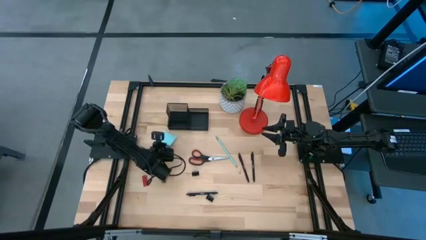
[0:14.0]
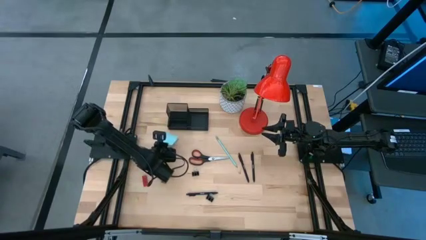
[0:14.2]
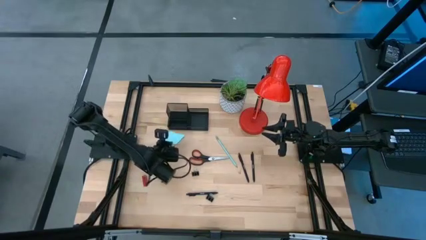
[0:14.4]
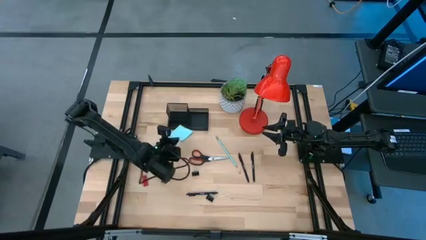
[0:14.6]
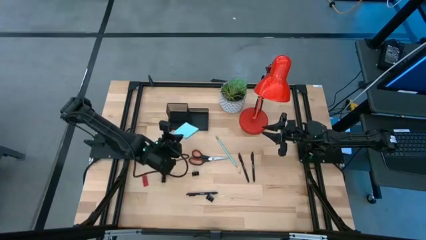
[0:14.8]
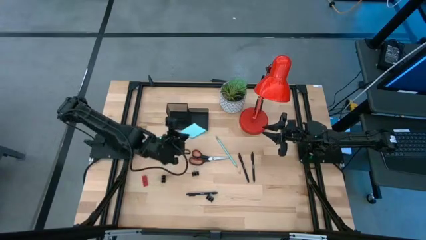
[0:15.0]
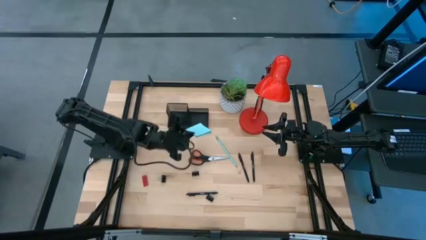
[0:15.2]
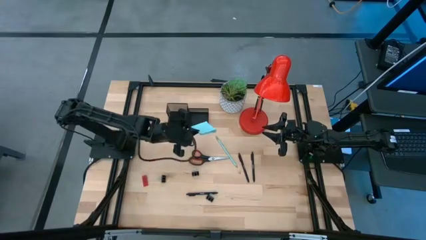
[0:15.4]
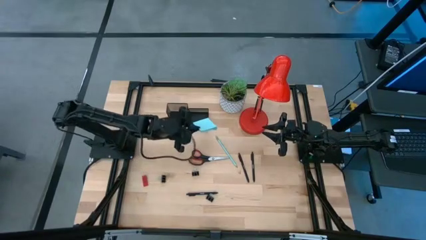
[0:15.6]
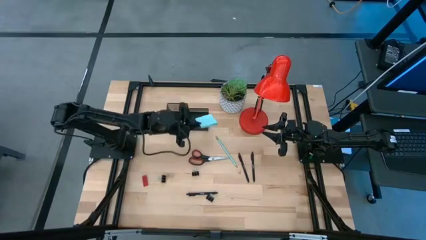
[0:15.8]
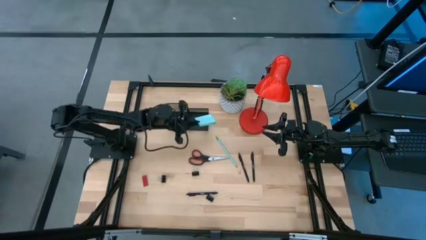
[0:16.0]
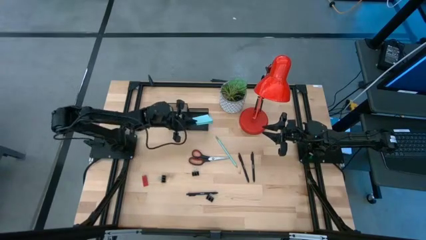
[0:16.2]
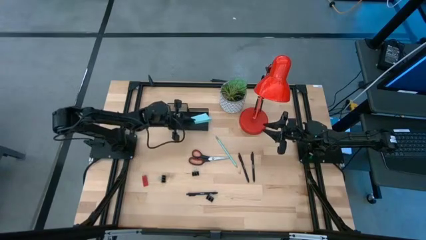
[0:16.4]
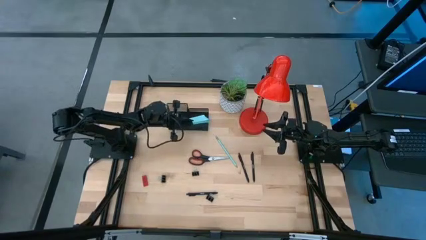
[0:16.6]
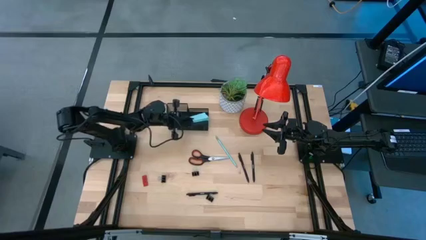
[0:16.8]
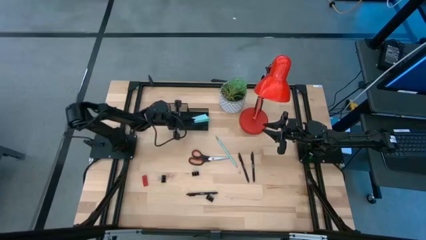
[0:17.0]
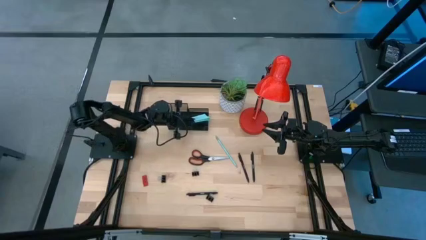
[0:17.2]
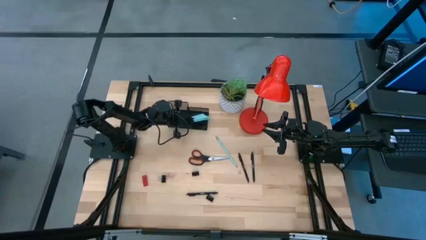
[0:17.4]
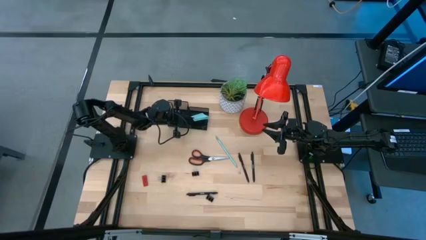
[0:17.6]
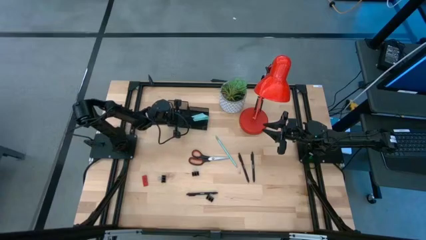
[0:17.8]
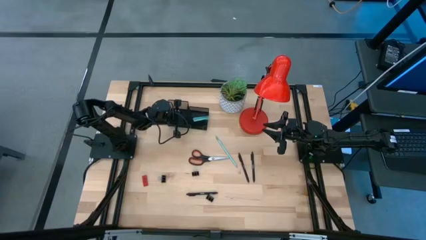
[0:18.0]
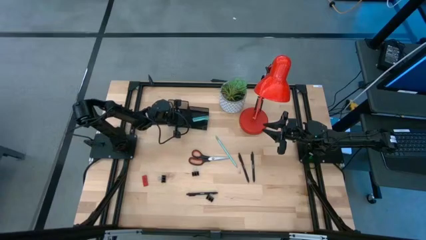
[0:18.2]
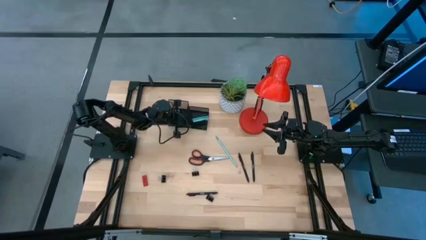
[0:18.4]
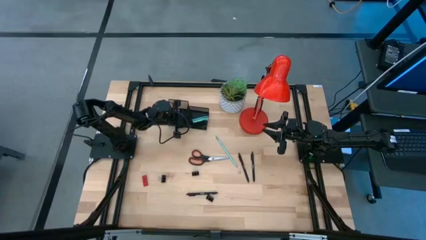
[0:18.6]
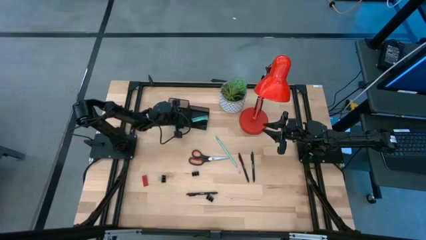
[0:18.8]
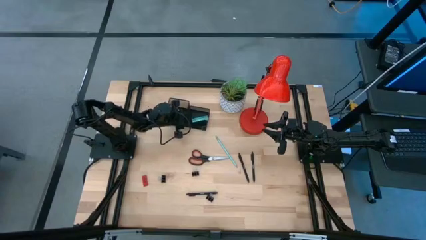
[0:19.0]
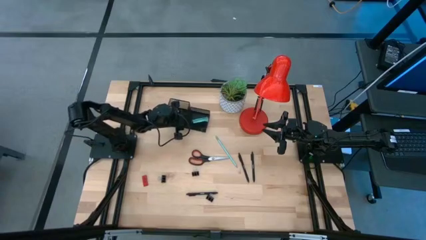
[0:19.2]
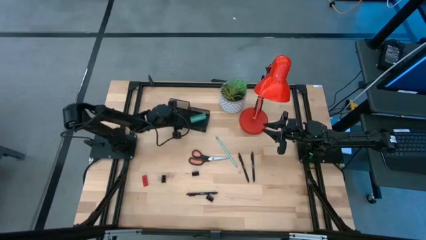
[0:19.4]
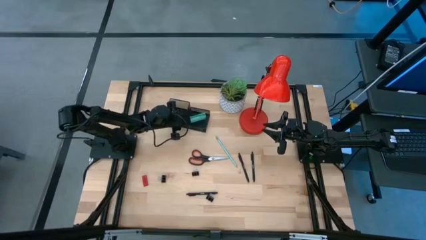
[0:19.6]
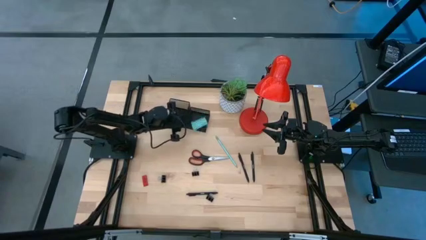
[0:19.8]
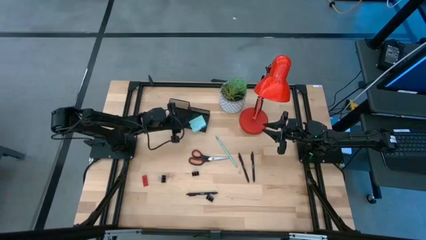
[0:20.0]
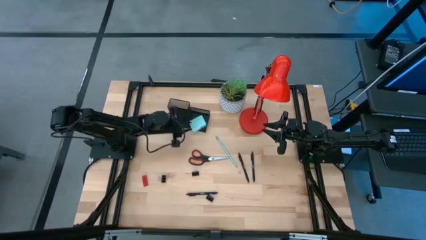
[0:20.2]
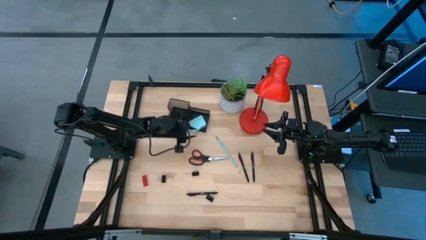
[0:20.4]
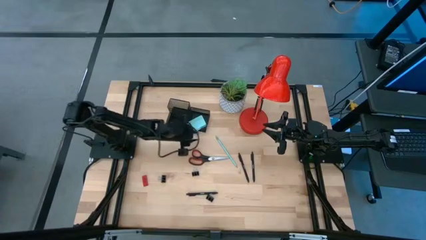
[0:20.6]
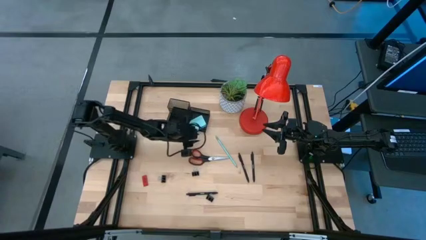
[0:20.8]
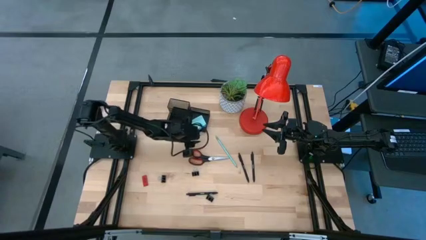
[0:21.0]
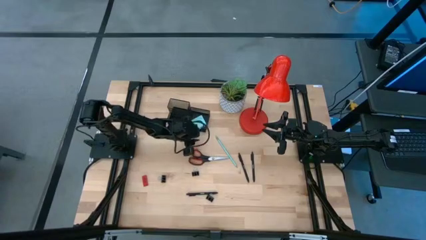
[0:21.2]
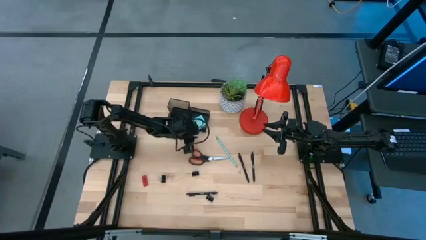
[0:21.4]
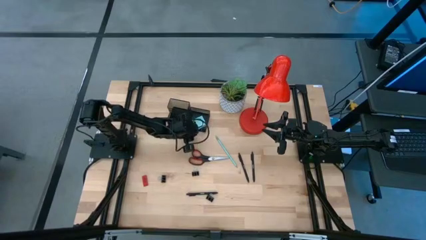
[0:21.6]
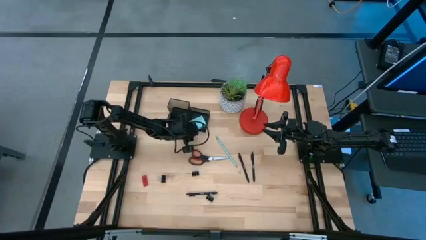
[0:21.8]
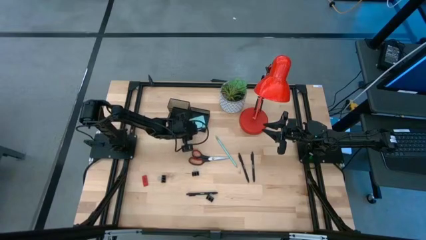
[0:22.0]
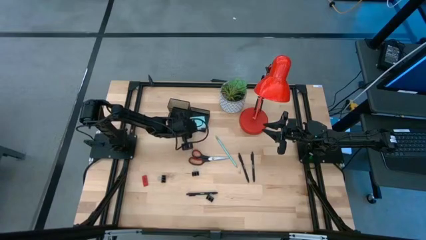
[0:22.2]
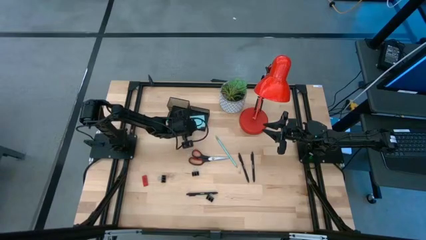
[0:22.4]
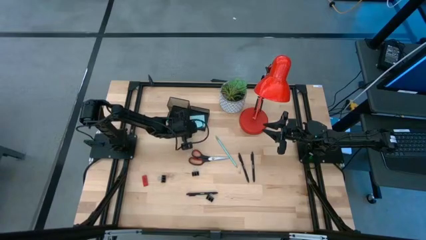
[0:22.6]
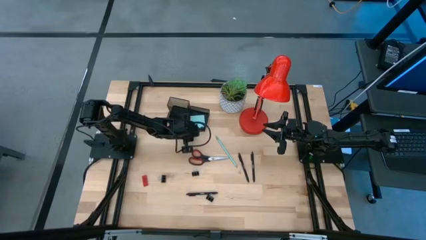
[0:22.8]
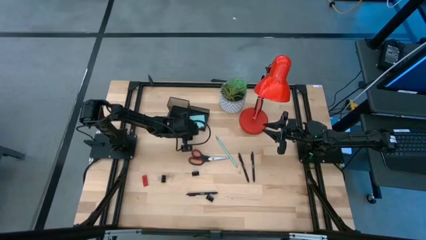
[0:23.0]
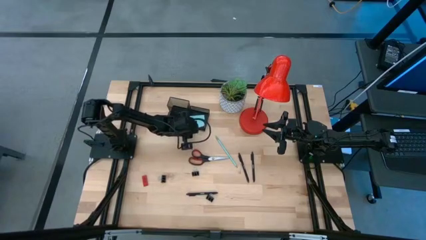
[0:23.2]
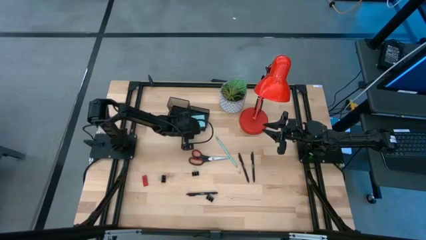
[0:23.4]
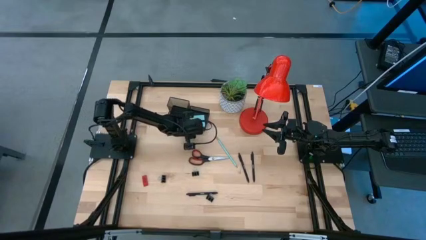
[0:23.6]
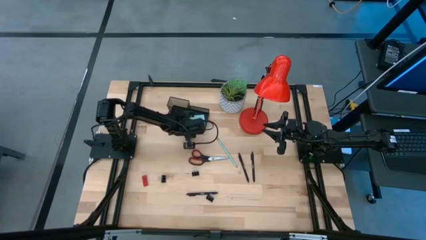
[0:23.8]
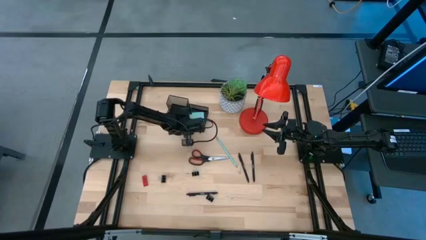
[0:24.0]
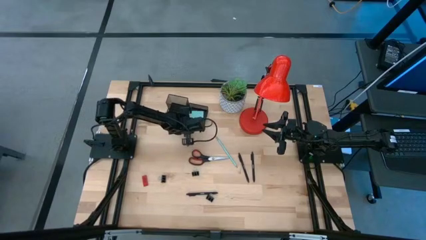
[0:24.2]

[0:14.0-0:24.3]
Task: Pick and place office supplies into organizer
Put the blue sticky note into the black desk organizer

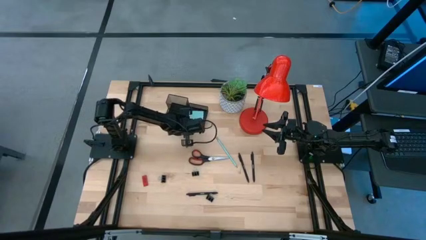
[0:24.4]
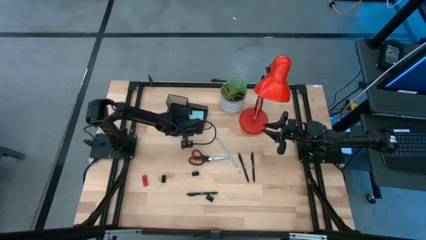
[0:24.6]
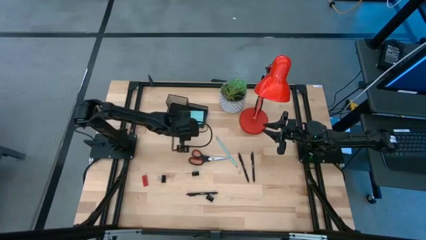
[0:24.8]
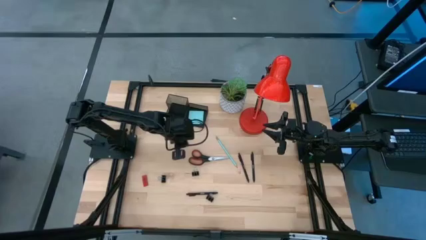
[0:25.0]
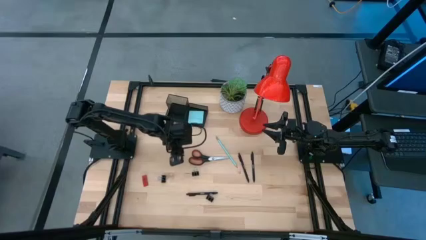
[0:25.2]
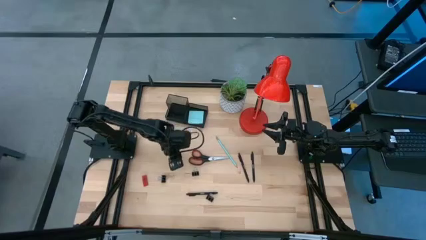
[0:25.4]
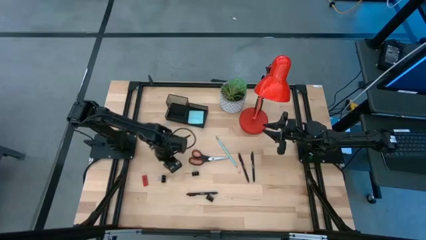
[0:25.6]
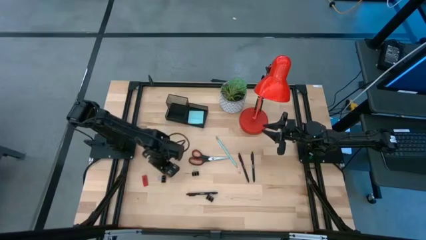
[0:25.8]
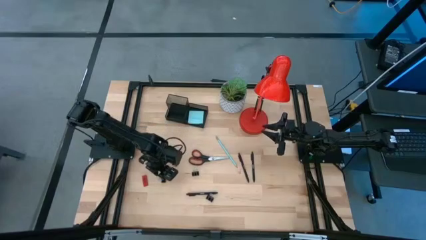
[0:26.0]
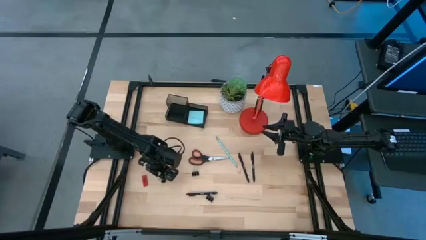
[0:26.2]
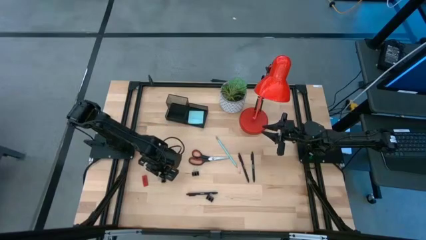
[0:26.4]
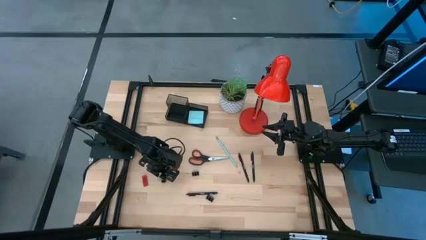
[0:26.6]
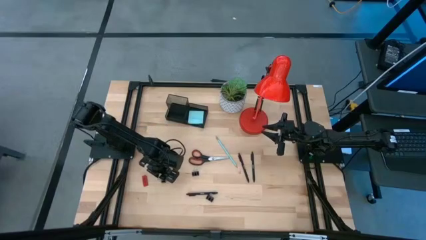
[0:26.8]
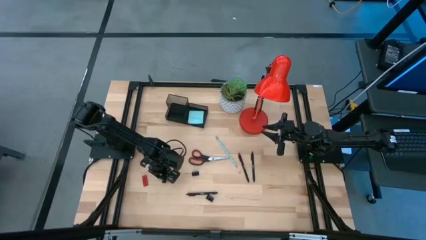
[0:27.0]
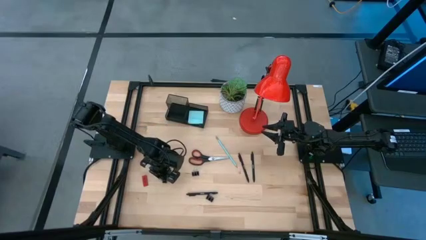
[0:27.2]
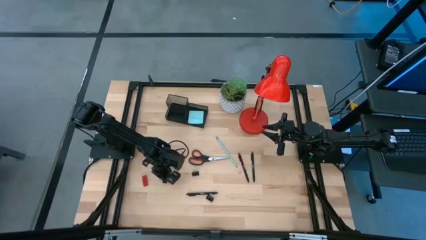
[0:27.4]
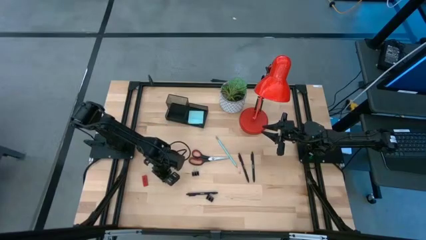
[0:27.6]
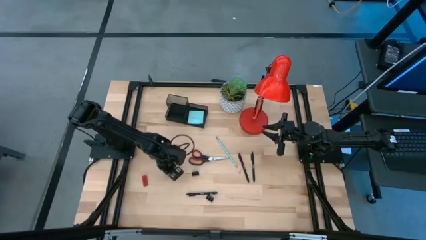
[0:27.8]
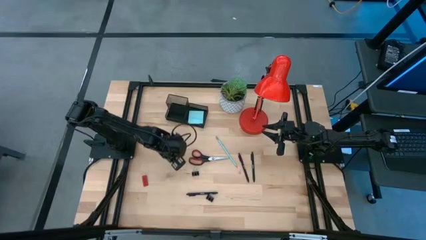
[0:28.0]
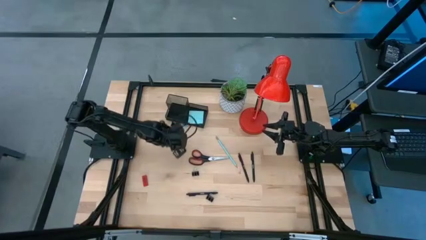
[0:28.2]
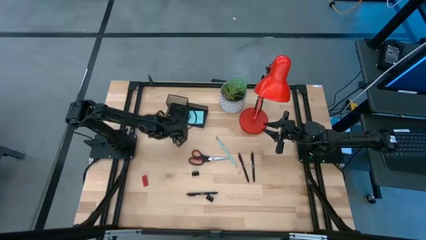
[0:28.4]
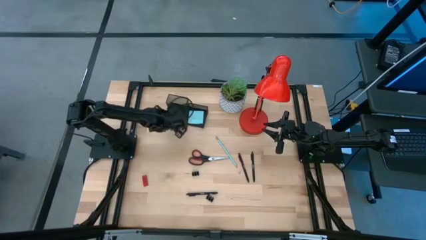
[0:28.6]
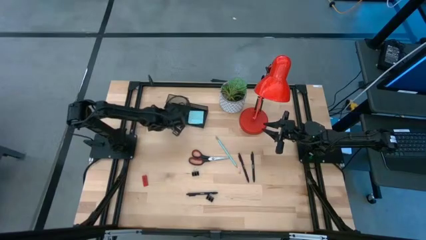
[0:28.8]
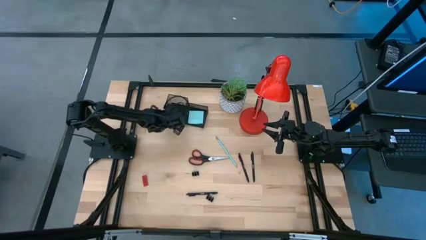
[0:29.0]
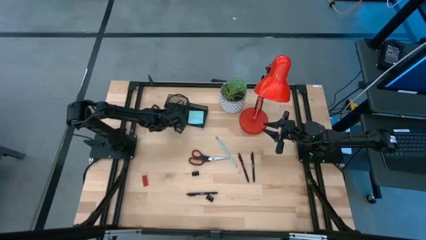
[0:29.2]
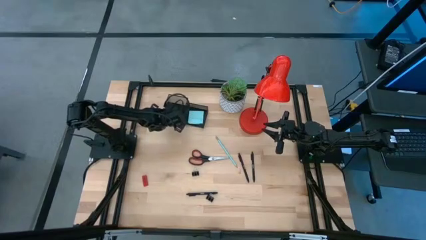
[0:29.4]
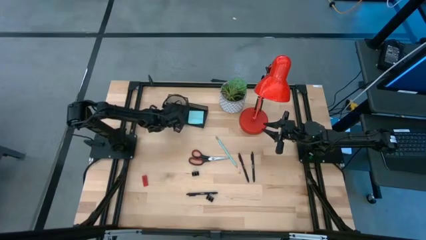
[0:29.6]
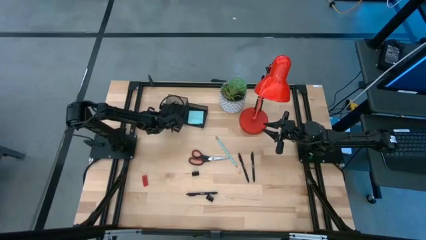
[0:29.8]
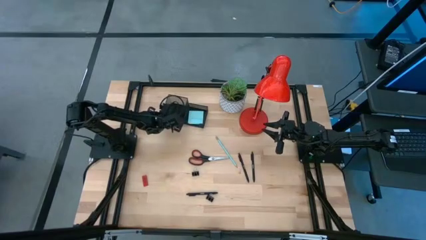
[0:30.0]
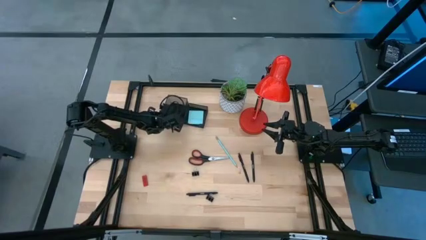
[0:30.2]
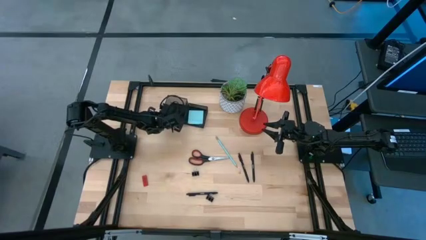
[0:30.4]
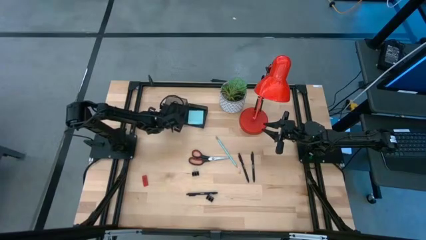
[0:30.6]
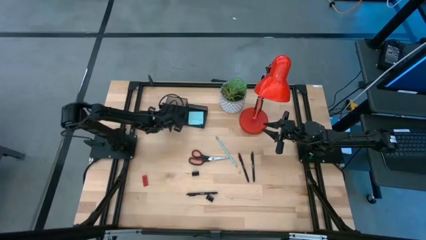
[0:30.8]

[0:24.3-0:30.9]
Put the top left black binder clip into the black desk organizer
